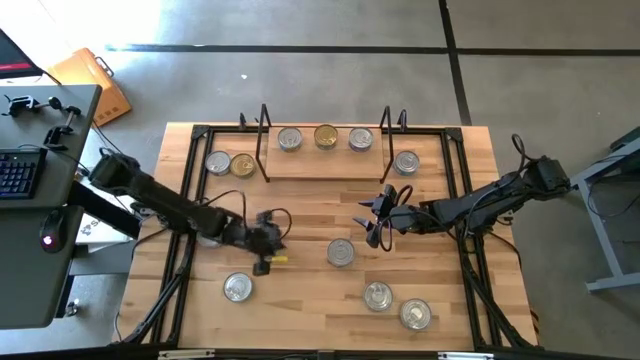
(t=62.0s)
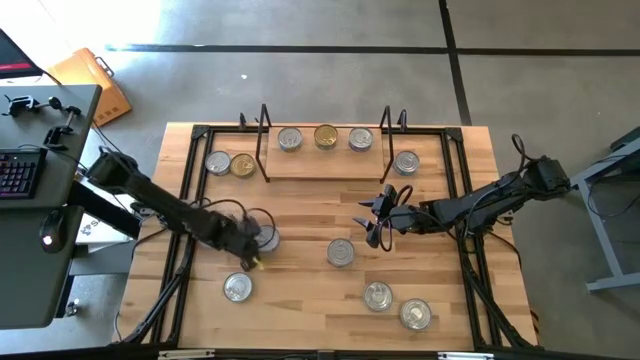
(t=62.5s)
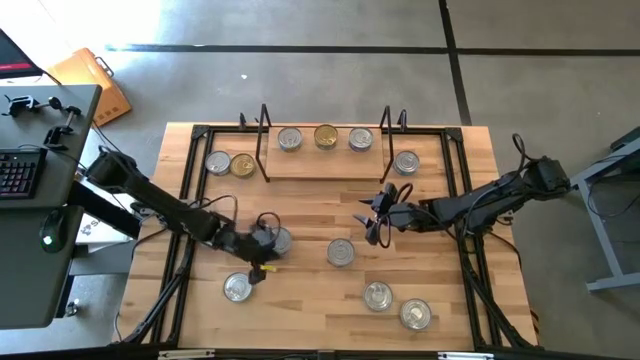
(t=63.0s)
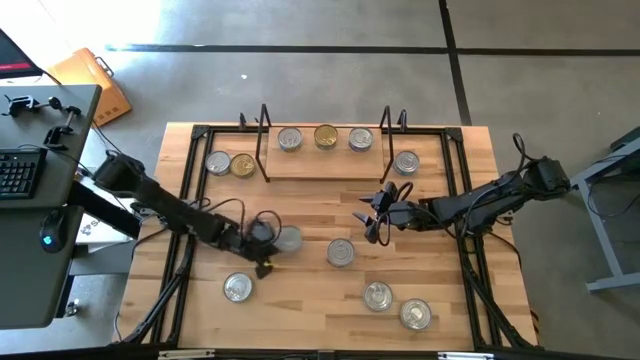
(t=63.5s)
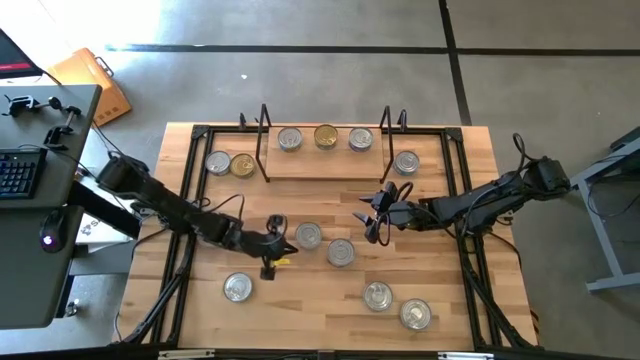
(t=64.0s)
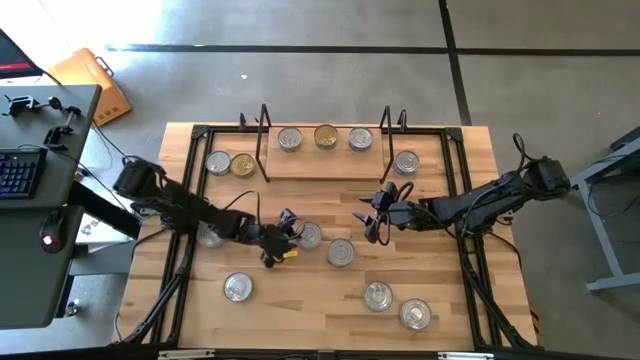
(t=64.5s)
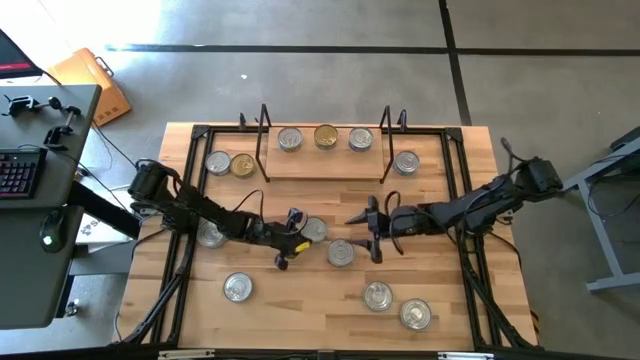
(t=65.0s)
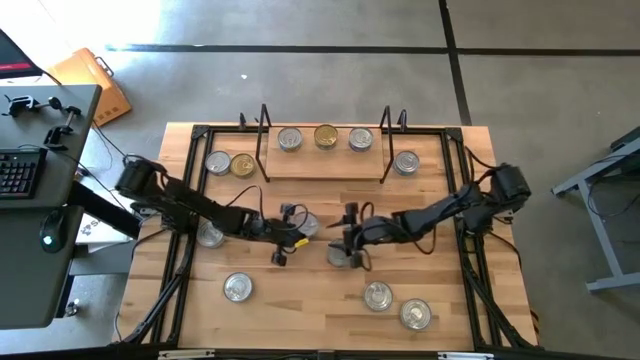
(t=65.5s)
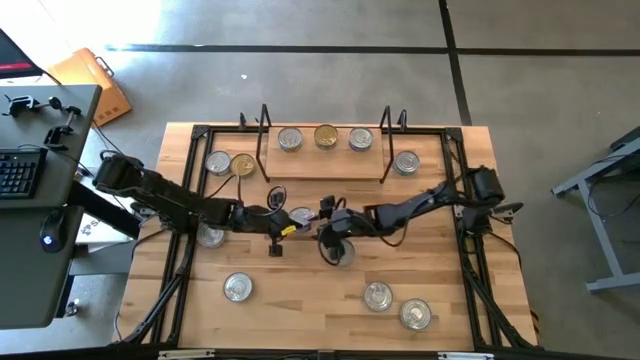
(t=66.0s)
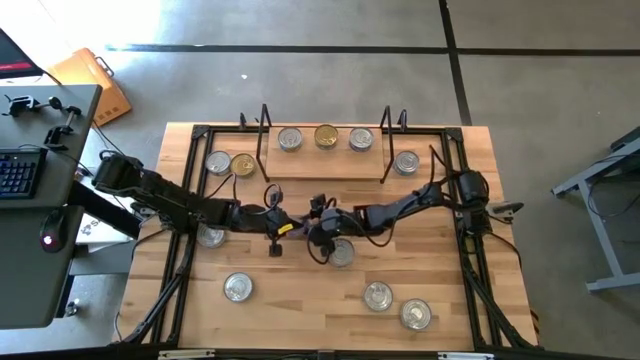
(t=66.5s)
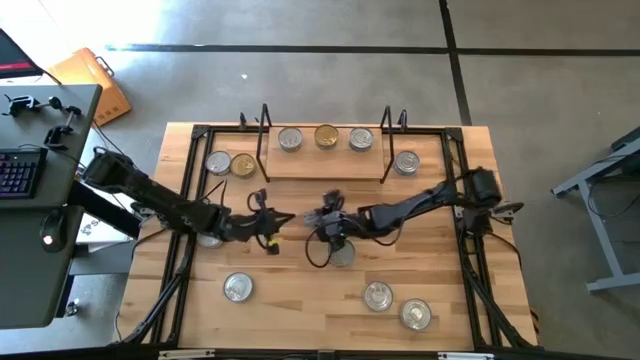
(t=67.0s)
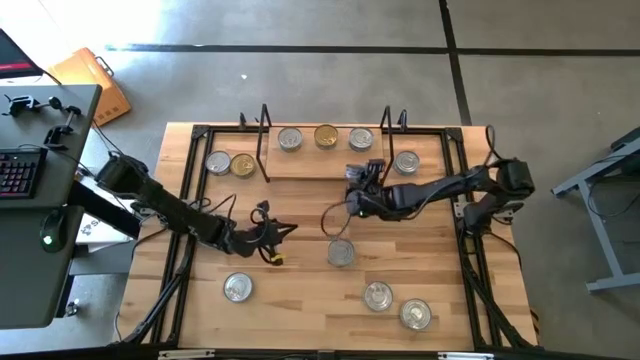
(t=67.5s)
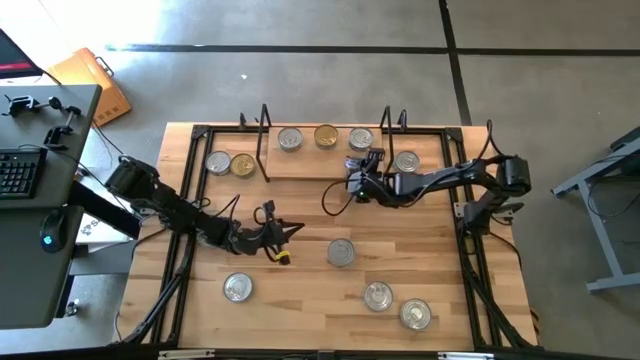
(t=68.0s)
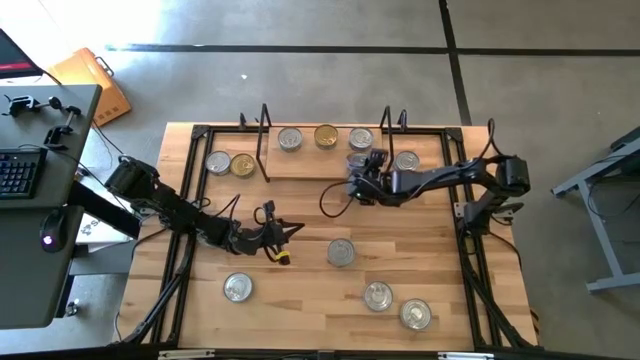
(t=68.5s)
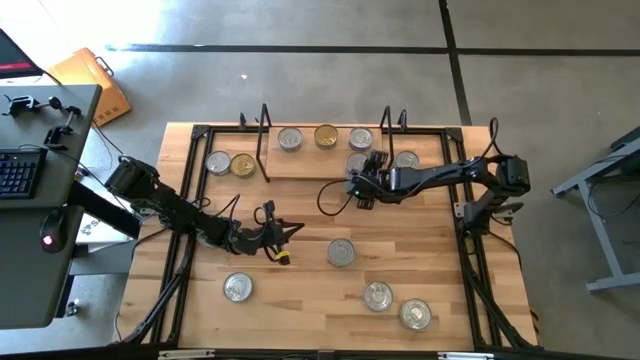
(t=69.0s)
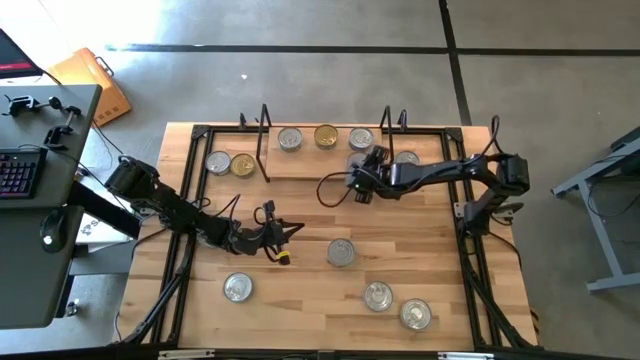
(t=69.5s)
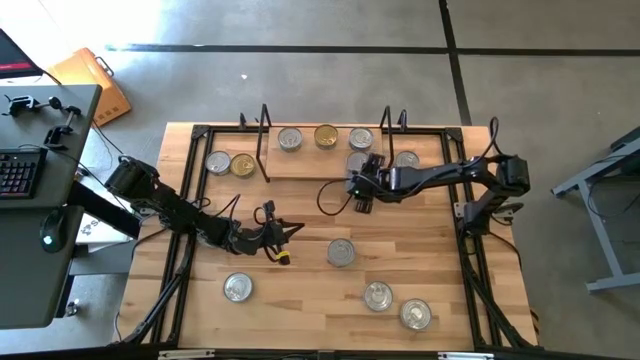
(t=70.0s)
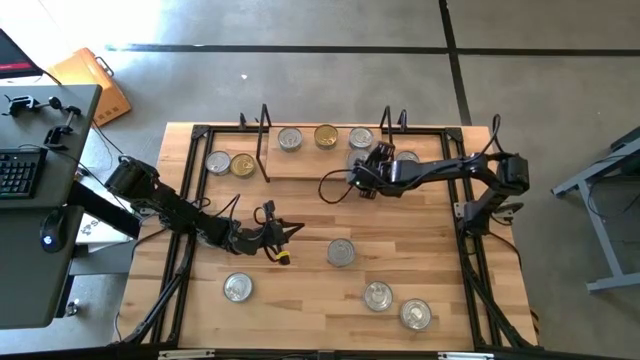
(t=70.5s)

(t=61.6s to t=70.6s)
Task: Stack canned seafood by type on shelf
Put the blue tuna can on the shelf aligned with the other blue tuna can

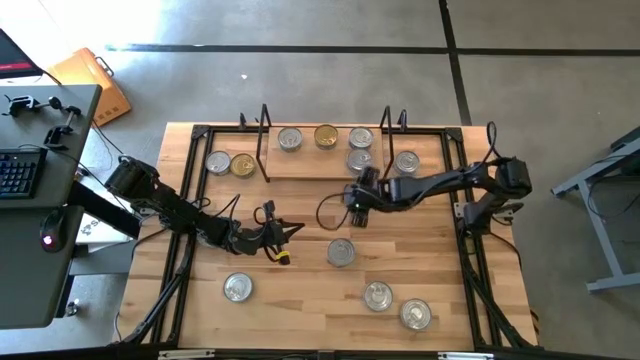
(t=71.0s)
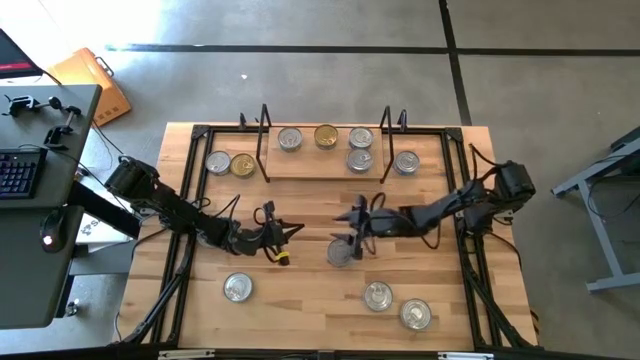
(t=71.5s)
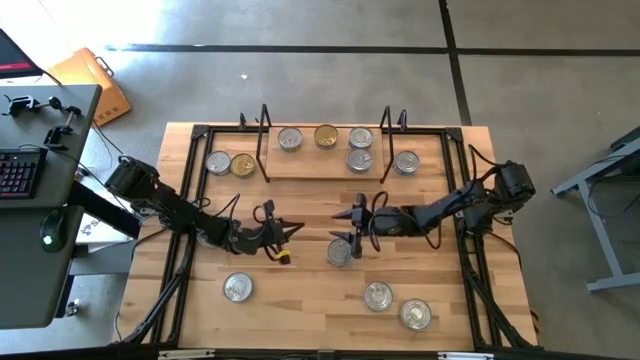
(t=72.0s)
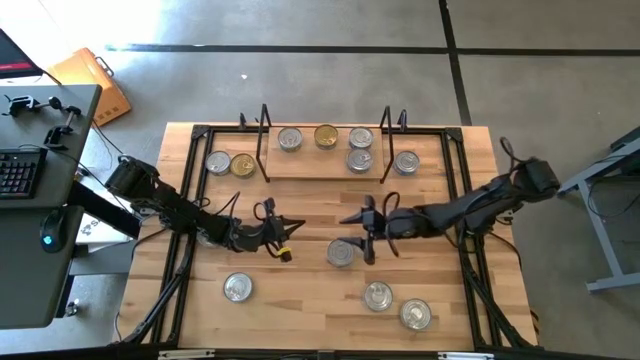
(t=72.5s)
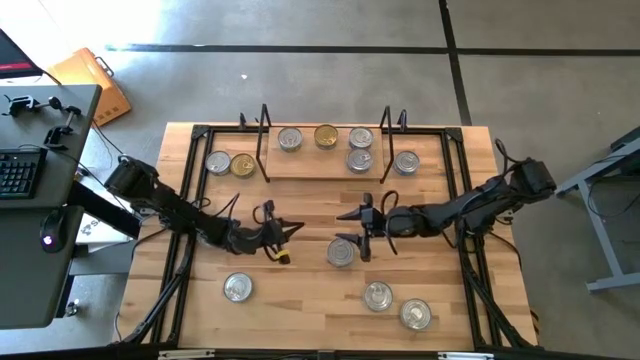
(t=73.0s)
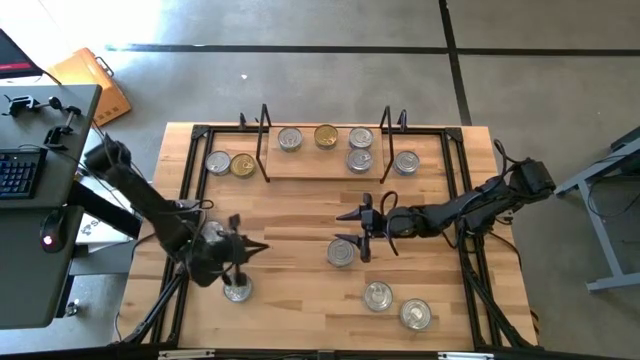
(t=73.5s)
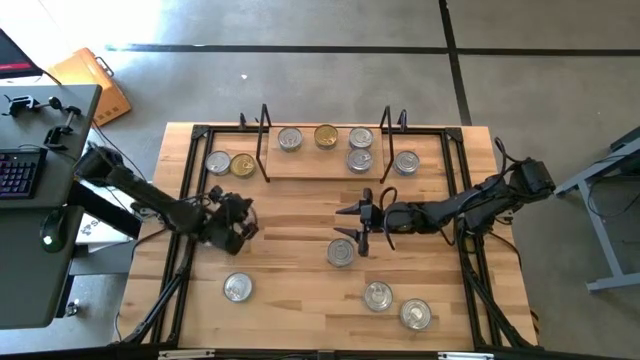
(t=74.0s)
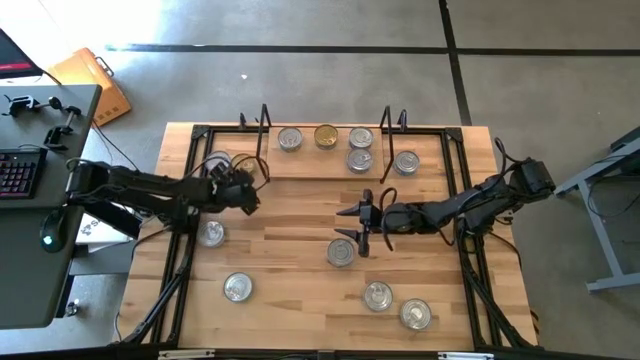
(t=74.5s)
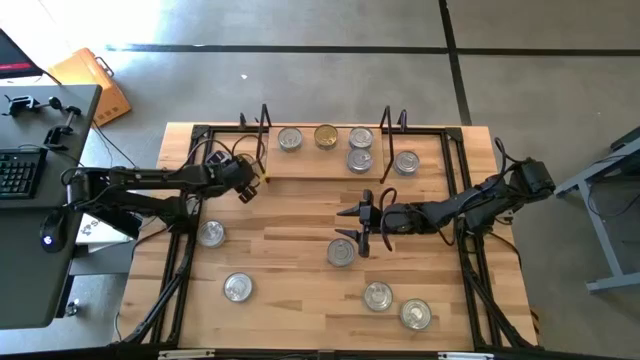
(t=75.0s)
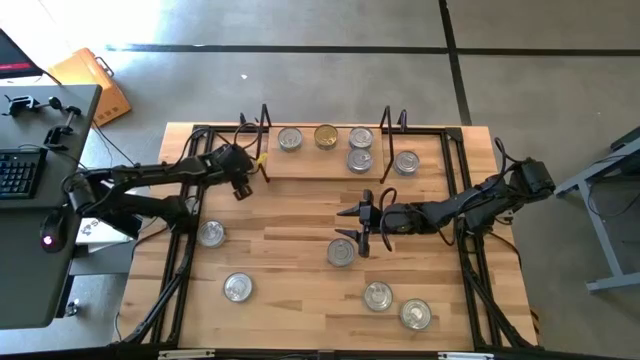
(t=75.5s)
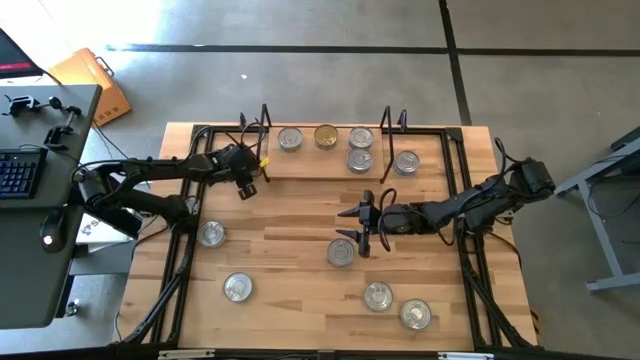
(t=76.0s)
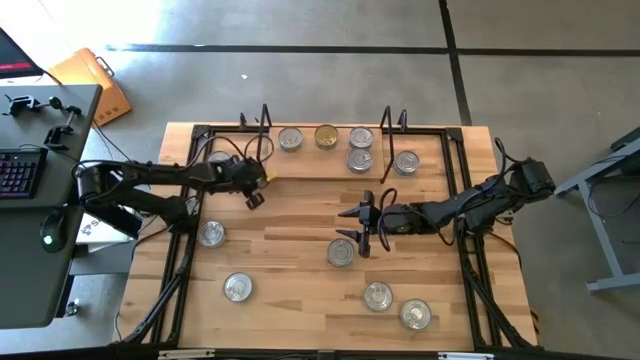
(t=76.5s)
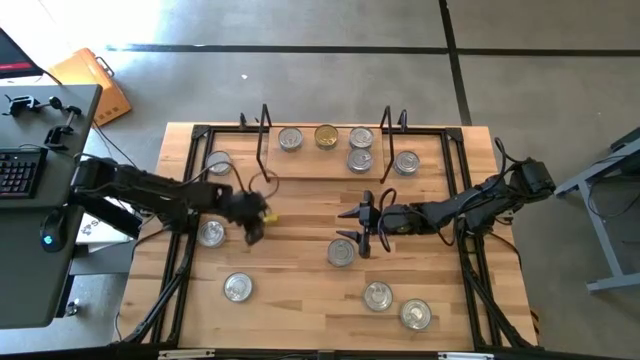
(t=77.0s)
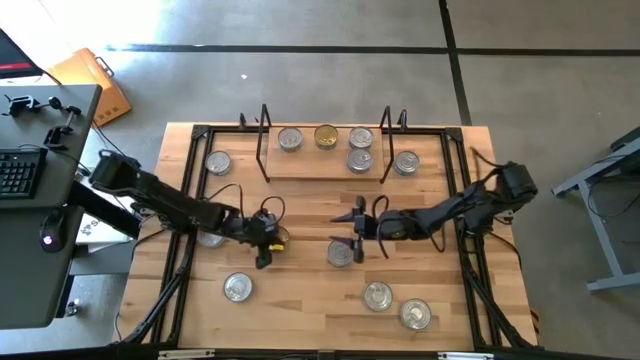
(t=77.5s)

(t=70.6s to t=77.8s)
Put the green tuna can on the shelf aligned with the other green tuna can

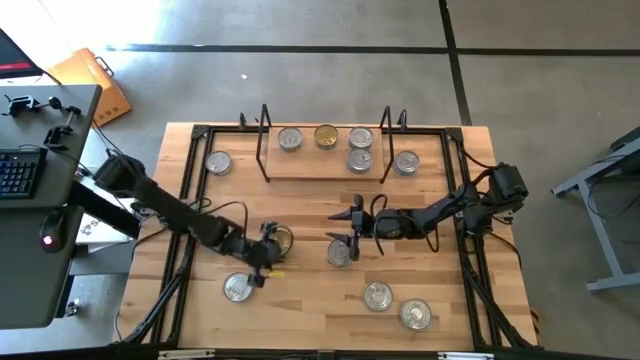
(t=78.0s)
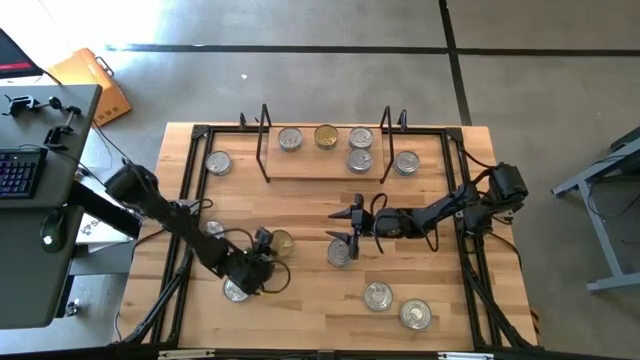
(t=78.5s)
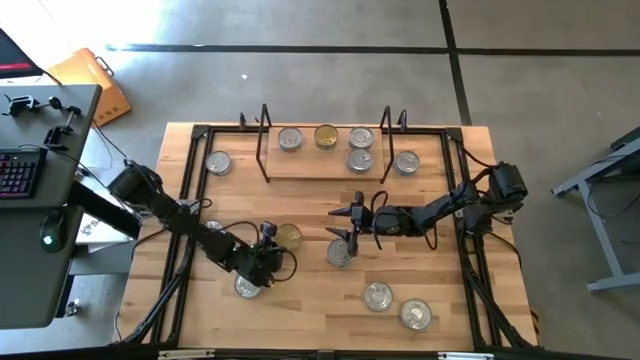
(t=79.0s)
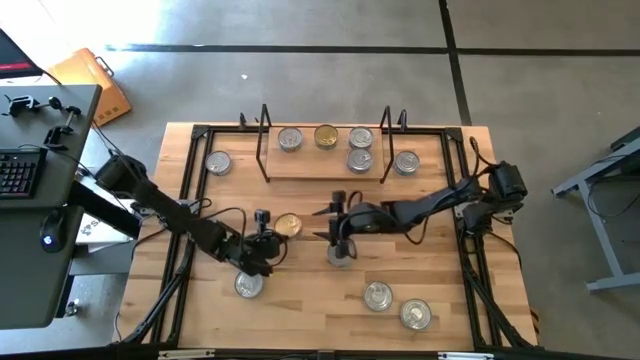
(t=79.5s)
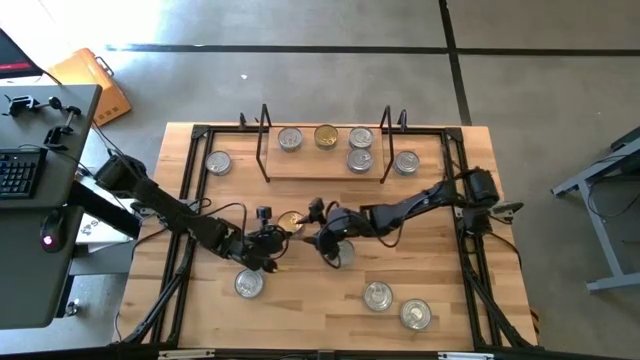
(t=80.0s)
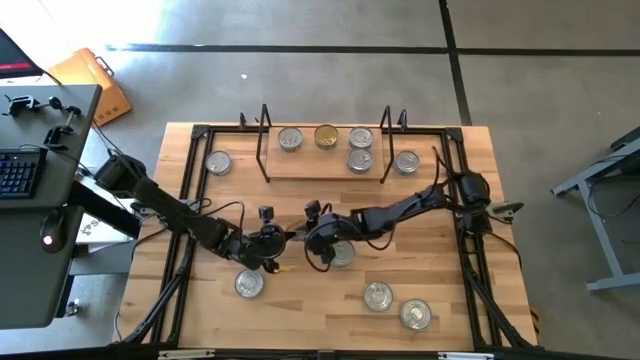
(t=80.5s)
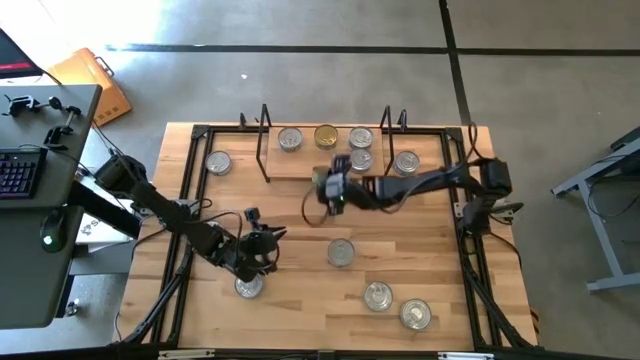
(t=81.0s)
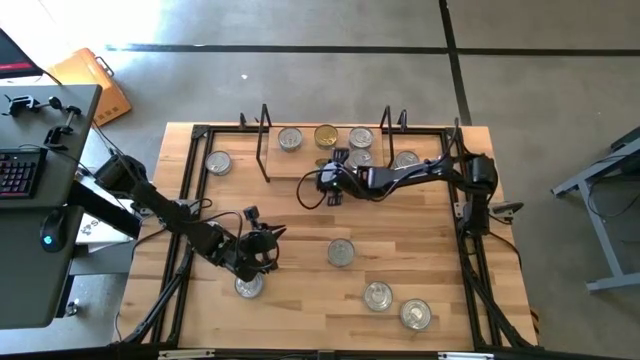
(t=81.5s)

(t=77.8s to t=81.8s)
Put the green tuna can on the shelf aligned with the other green tuna can
